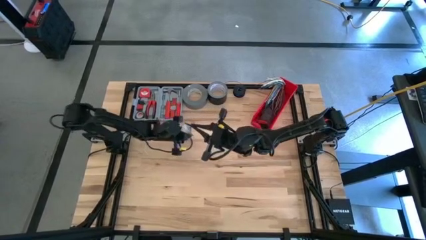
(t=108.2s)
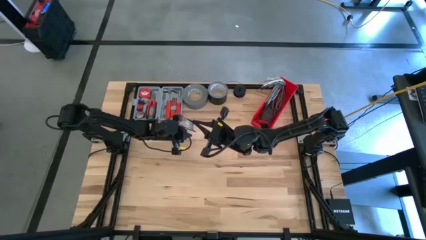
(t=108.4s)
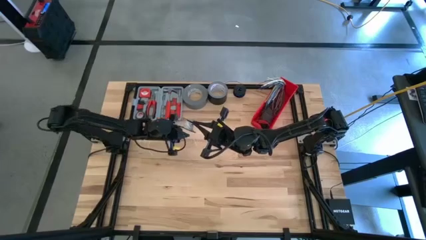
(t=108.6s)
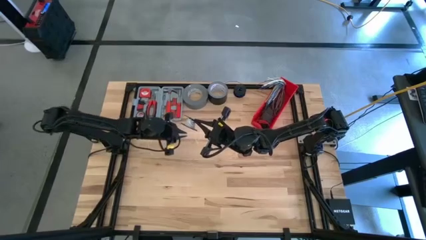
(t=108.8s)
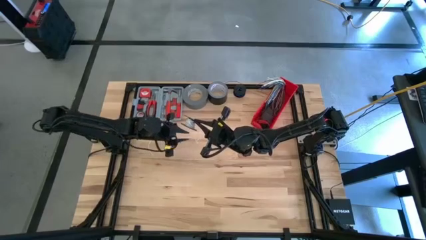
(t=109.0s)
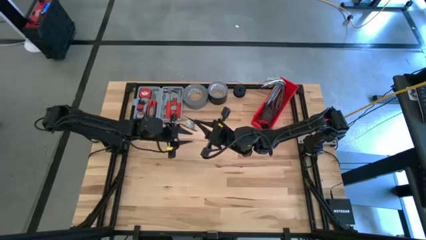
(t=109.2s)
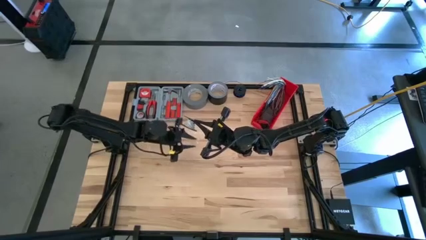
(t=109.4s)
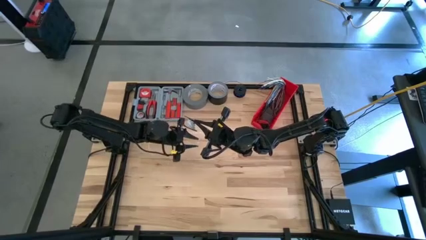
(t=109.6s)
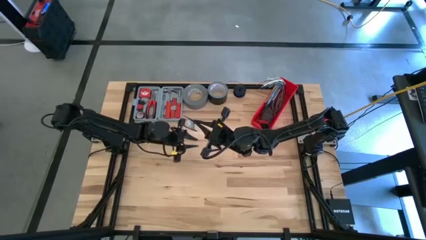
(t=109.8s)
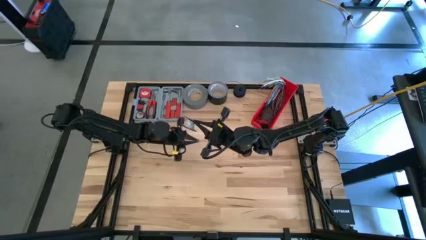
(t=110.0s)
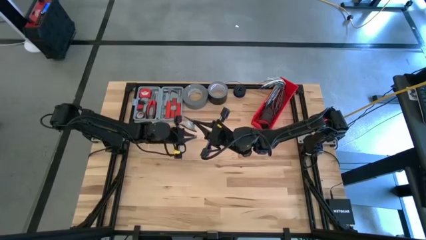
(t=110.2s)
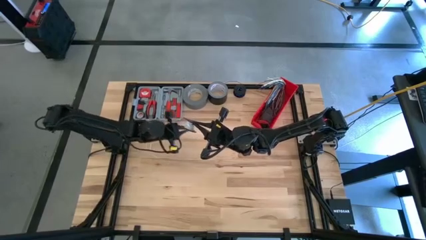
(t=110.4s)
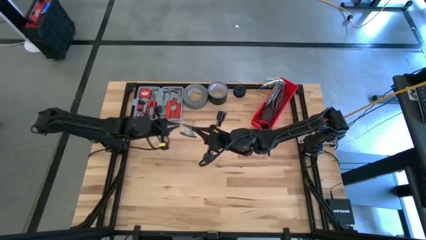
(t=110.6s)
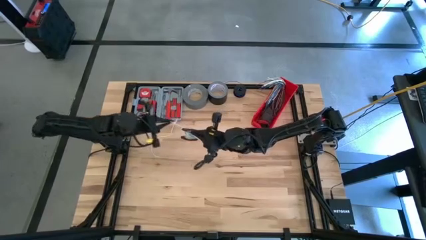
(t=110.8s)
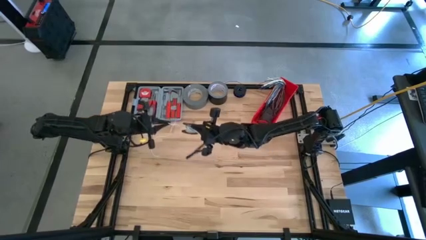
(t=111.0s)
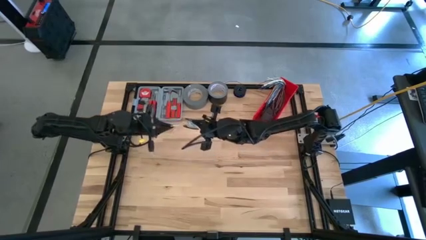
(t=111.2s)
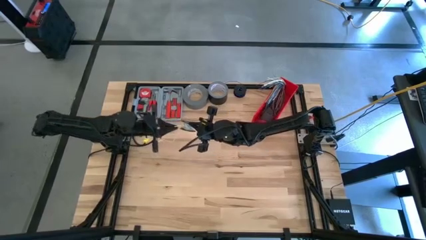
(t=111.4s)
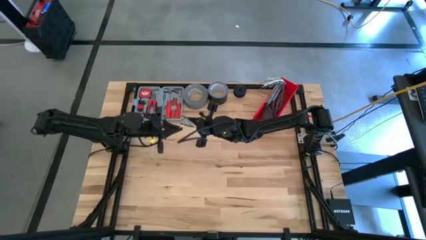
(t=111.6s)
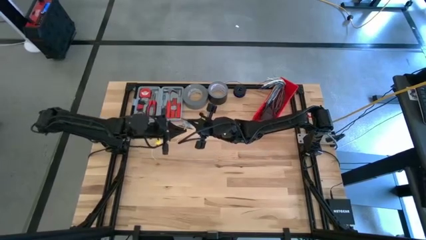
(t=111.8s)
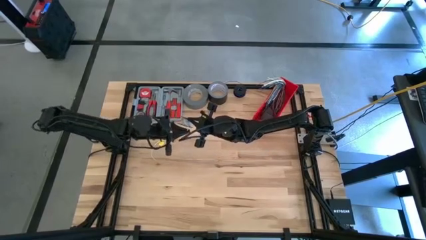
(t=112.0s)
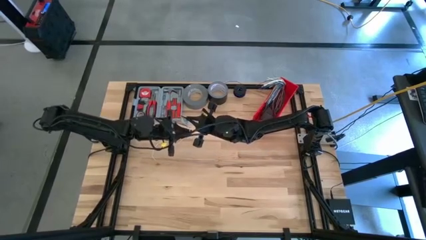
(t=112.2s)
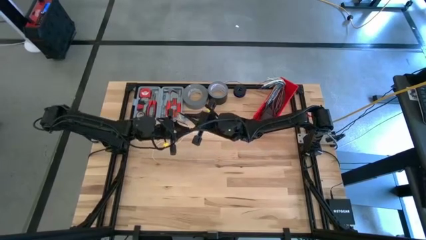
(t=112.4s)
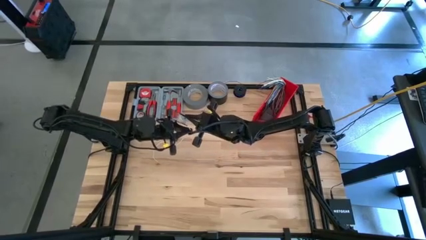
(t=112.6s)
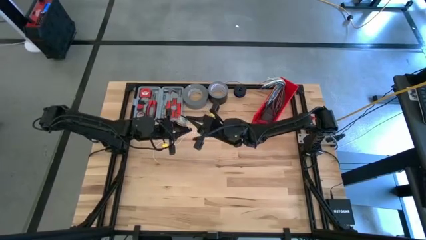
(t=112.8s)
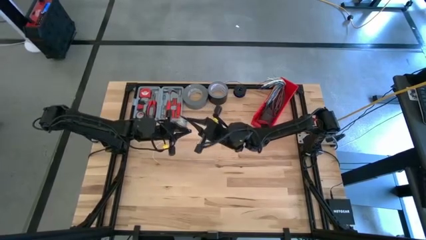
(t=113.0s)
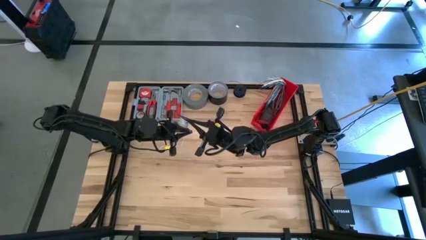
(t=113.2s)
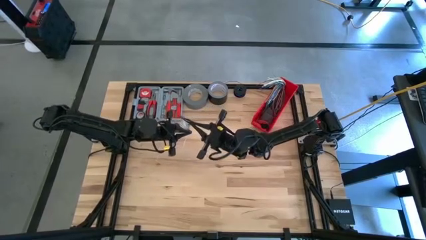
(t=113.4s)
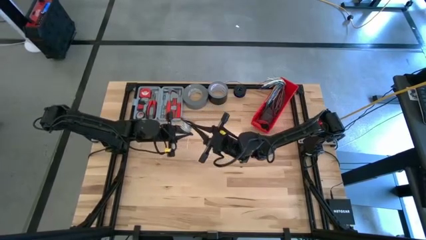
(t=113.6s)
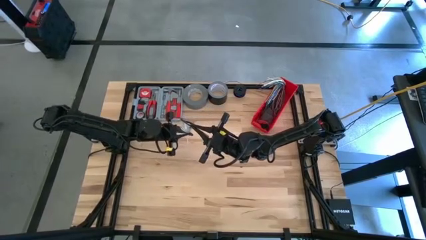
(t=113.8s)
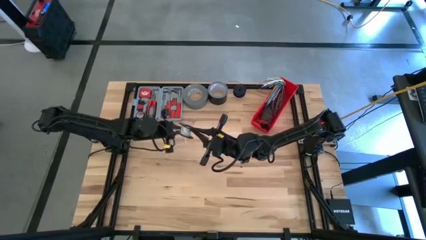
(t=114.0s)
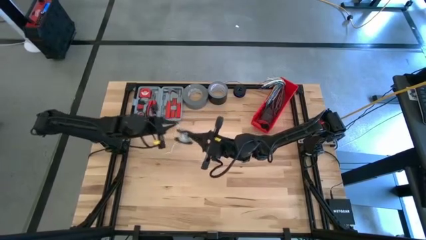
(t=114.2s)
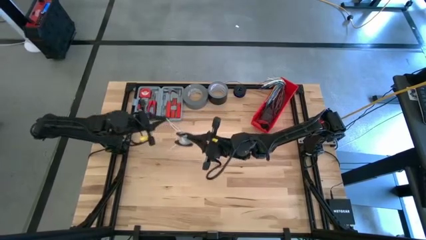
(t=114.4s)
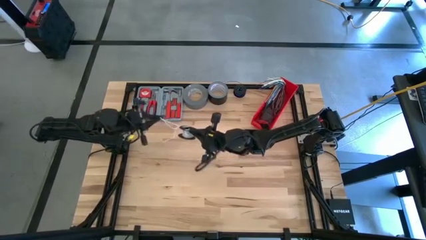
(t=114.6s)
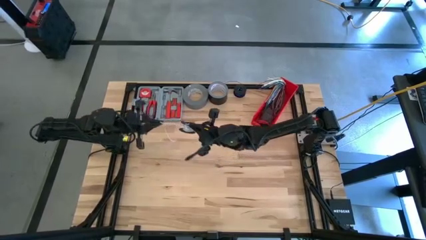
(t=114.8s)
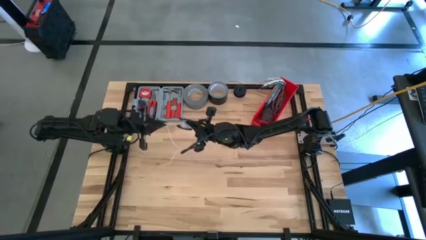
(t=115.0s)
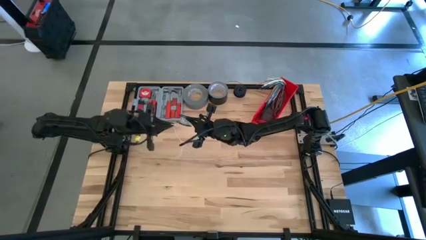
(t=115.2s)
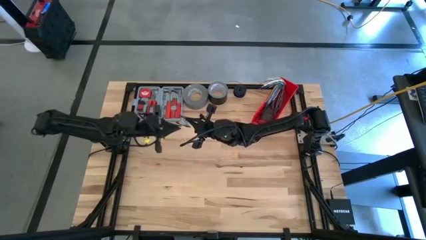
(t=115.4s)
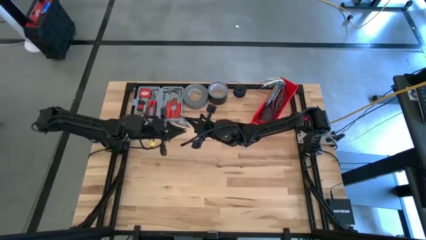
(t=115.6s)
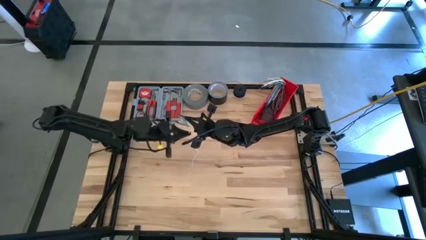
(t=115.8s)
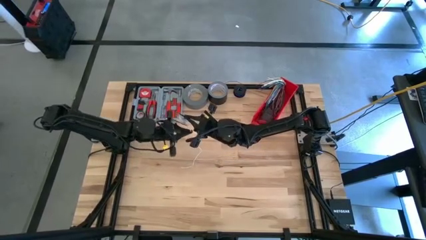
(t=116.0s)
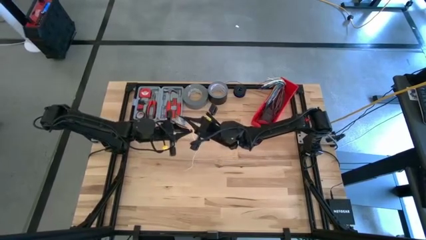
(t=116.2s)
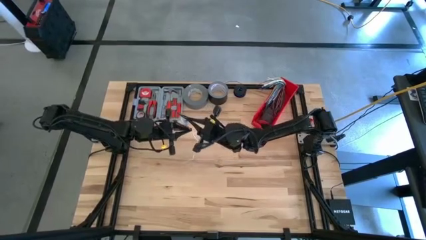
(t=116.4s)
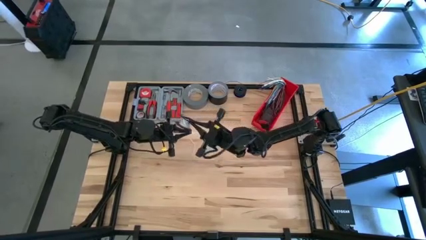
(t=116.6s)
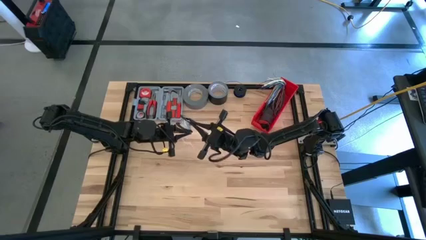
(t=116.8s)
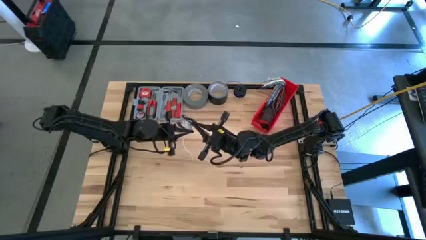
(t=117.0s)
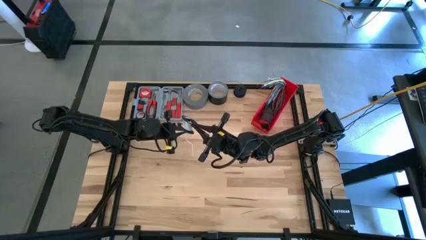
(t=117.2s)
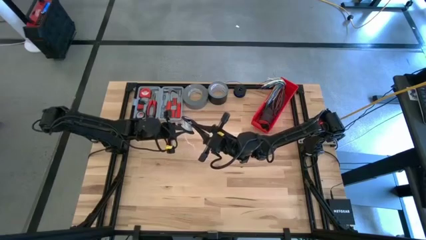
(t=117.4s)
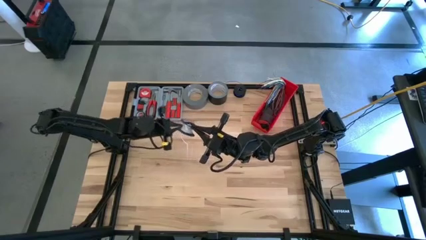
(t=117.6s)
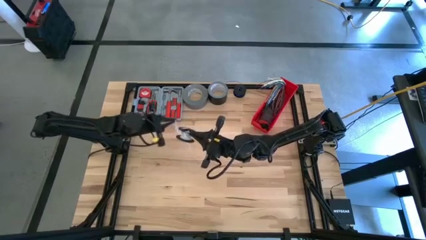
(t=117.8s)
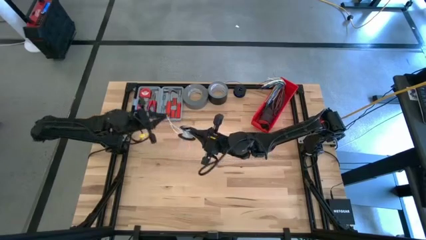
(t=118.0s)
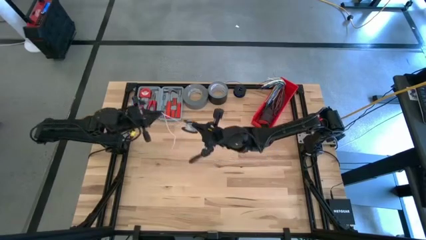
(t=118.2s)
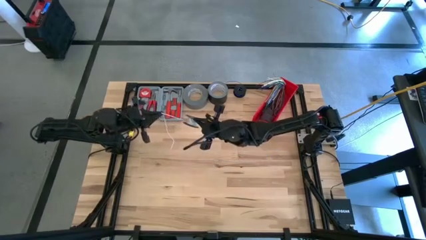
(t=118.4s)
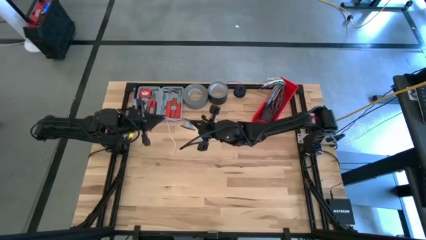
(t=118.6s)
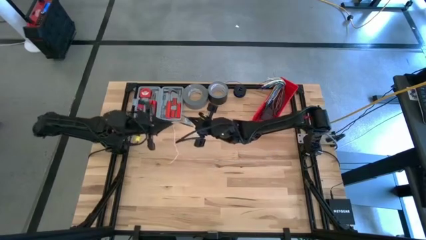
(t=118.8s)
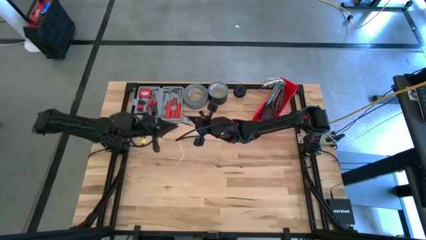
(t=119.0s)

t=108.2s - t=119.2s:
Task: Coil cords
Coil the white wire on the black spool
